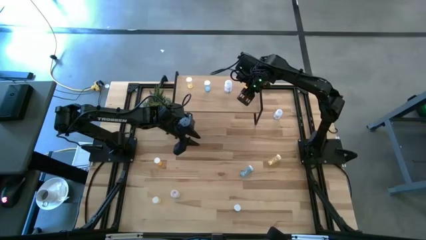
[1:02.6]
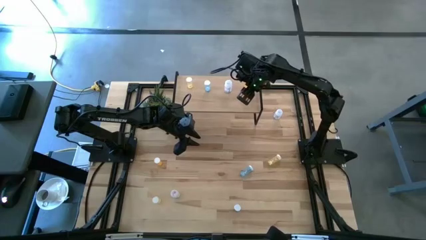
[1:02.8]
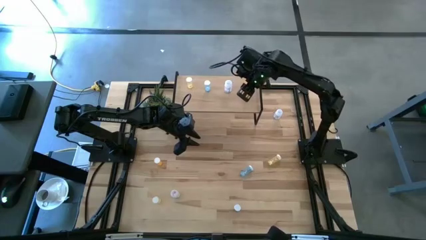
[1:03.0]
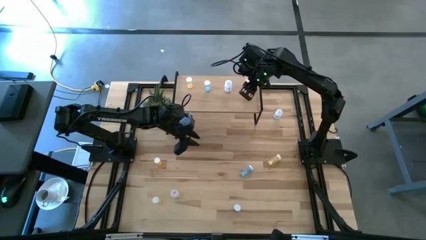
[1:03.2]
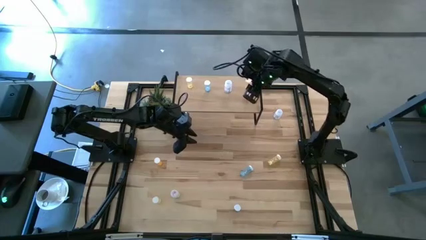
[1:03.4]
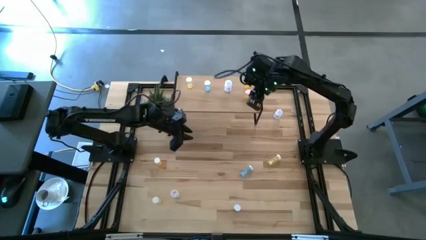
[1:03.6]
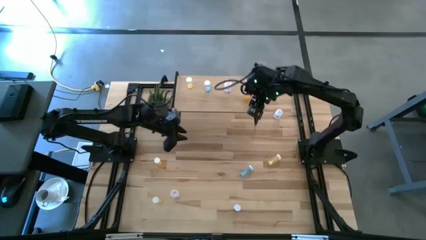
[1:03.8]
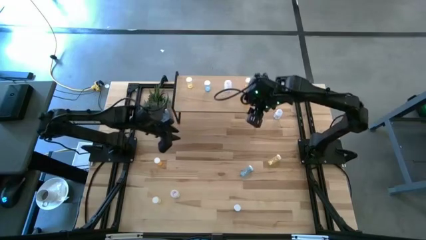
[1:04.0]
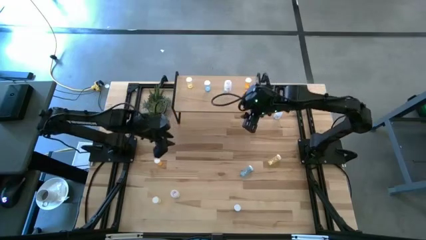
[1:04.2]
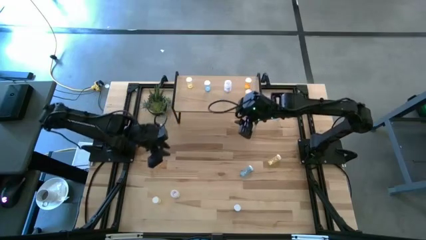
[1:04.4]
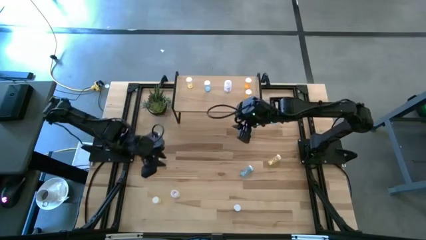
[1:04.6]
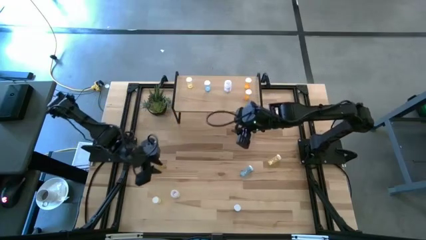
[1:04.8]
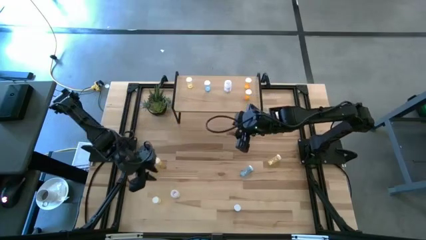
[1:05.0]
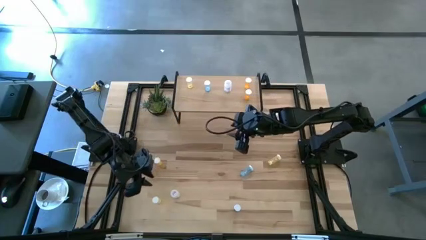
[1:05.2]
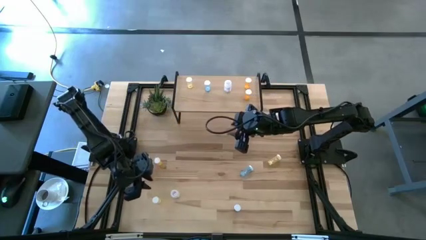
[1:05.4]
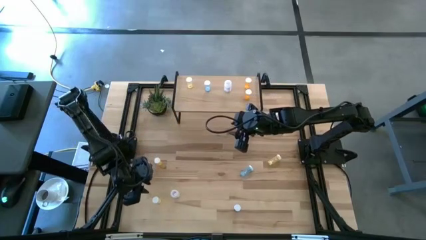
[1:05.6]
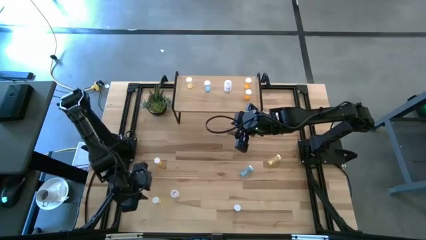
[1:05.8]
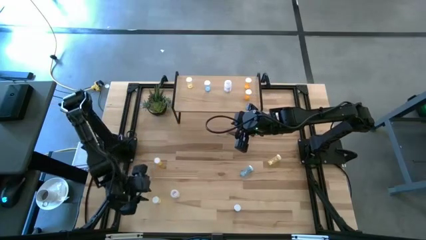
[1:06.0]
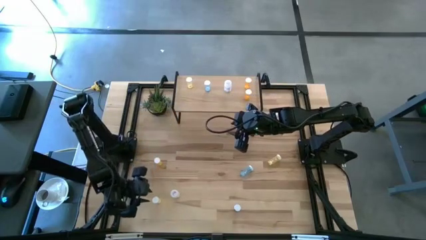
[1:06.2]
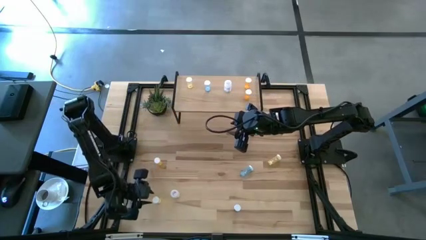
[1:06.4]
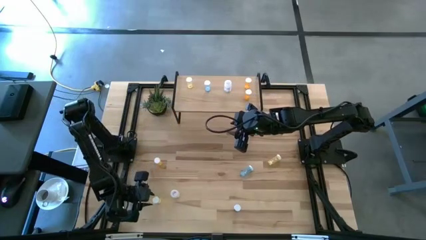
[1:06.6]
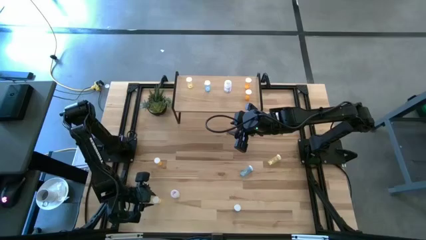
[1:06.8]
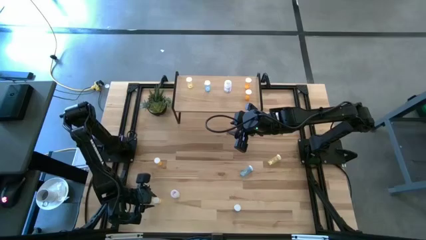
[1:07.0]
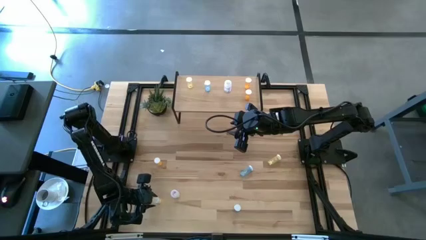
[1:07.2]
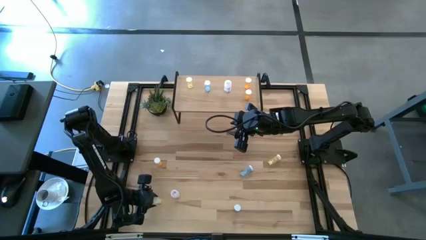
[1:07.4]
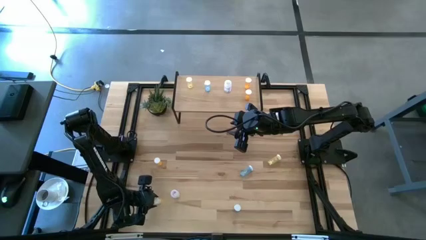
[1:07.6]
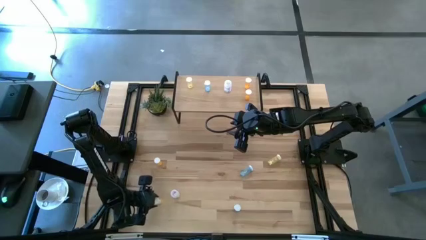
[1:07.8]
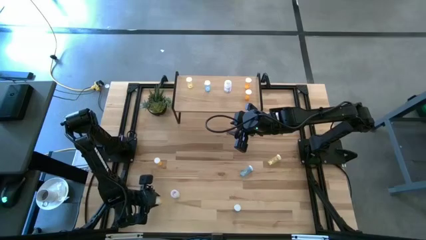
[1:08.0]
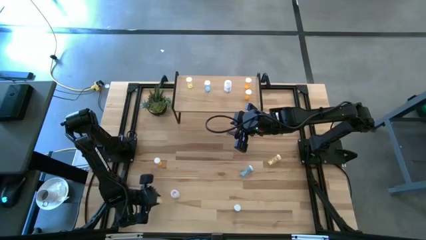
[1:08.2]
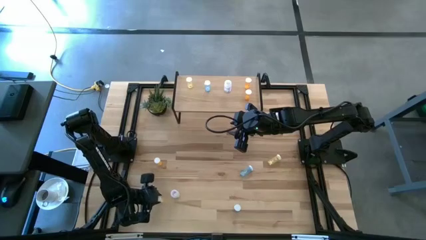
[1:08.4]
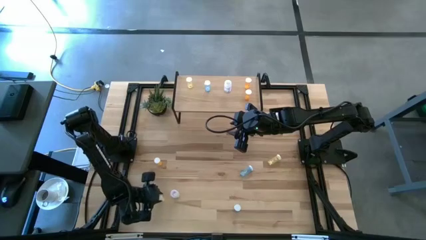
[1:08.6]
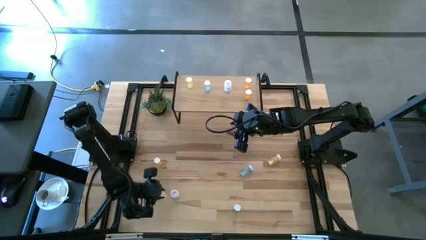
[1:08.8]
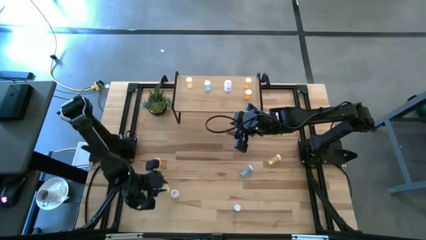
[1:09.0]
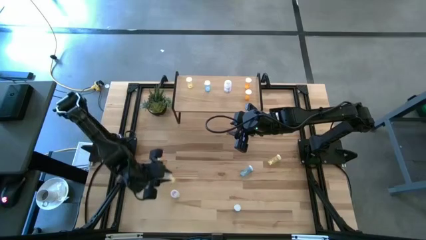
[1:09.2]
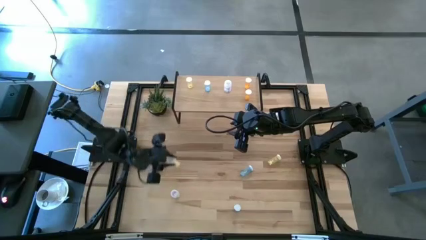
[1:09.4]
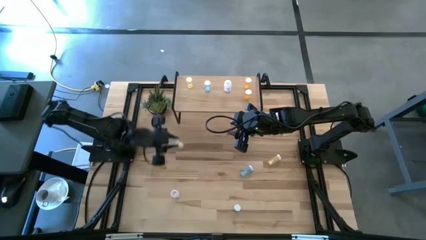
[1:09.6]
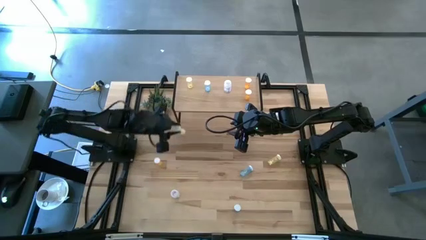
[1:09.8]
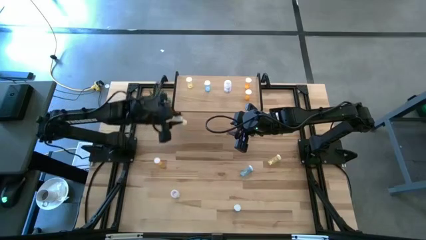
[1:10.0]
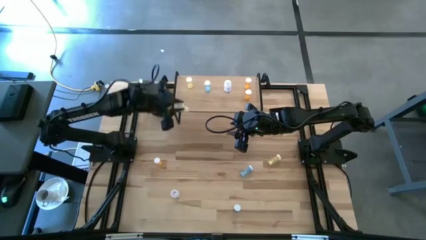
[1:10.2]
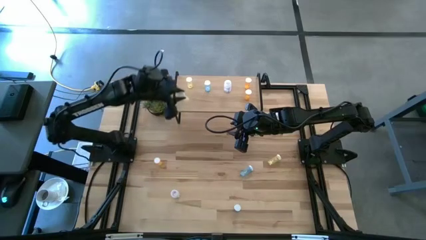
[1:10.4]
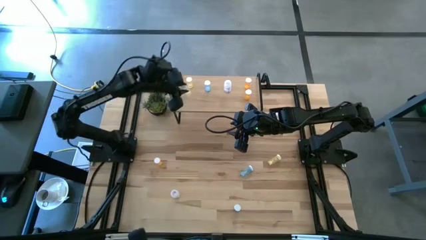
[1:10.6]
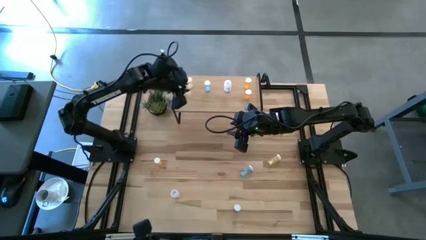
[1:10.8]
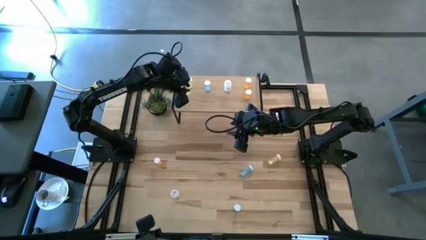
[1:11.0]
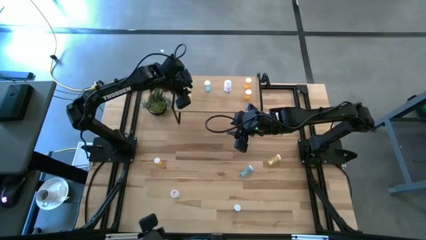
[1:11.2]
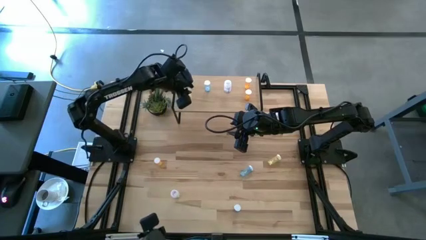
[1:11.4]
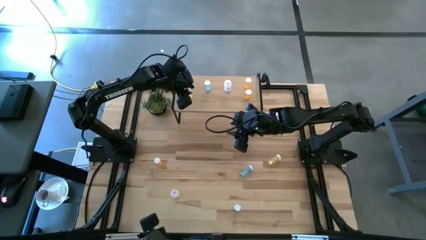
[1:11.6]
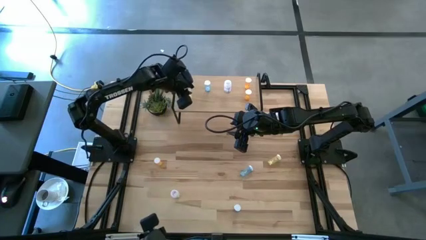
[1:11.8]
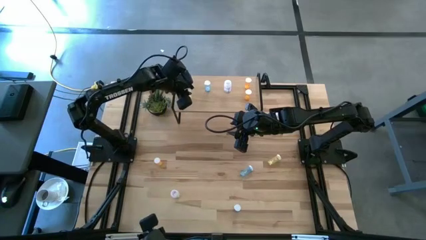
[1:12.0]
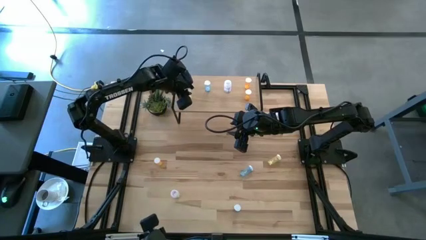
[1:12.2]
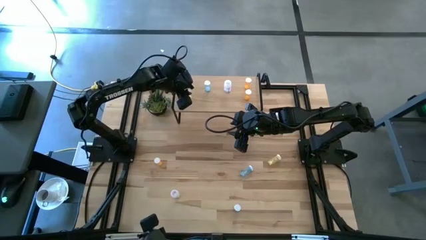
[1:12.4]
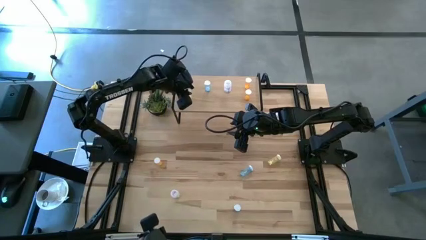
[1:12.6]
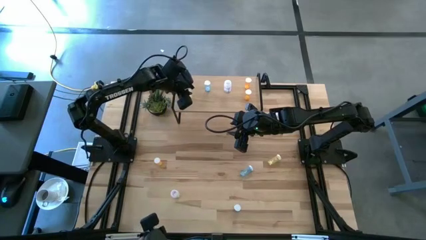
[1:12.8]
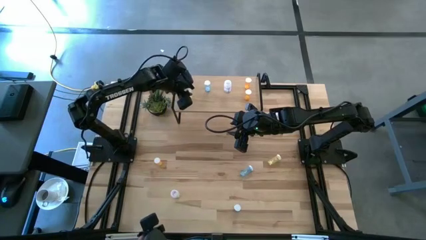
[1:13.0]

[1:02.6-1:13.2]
Task: Pick and place medicine bottles onto shelf by color
Put the left yellow pill bottle on the shelf

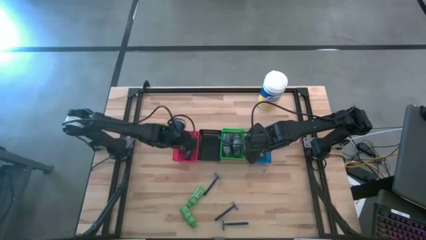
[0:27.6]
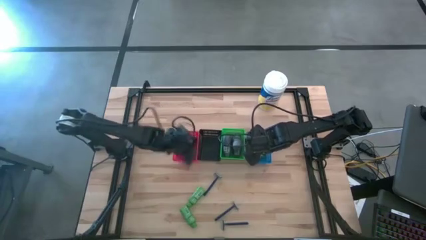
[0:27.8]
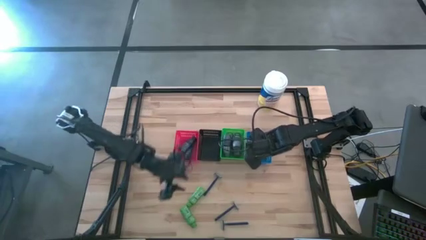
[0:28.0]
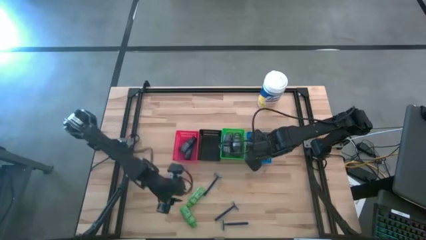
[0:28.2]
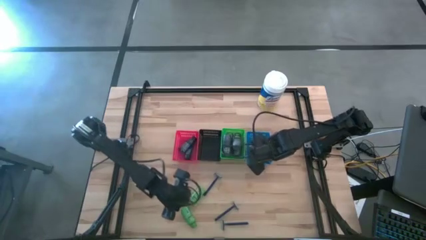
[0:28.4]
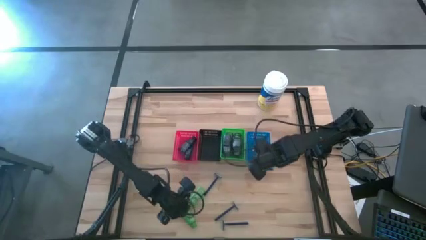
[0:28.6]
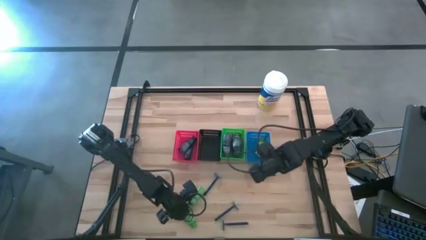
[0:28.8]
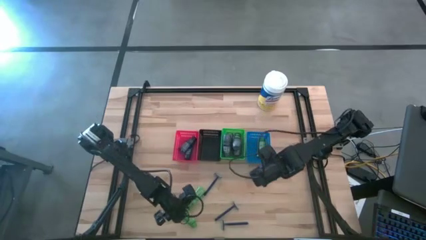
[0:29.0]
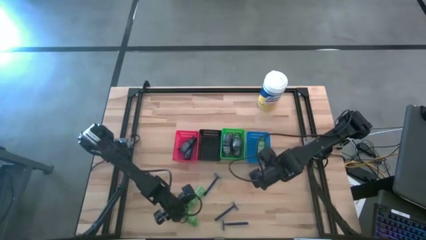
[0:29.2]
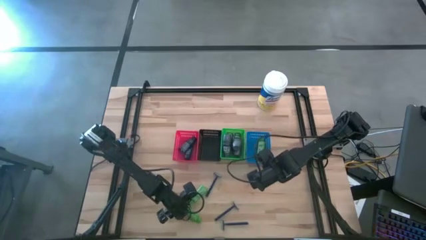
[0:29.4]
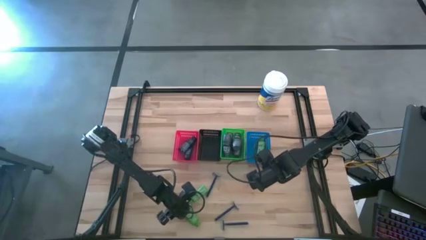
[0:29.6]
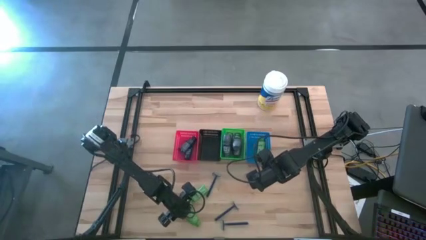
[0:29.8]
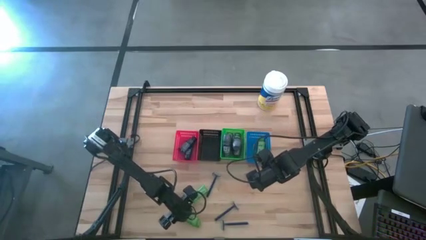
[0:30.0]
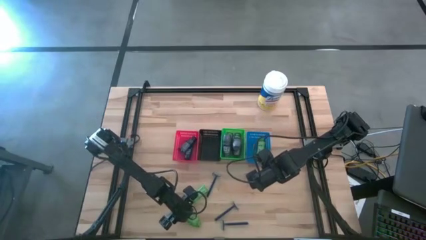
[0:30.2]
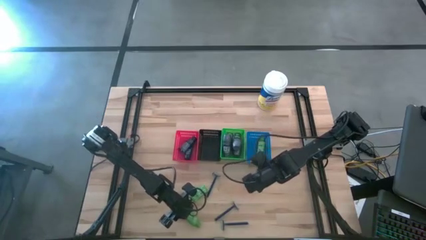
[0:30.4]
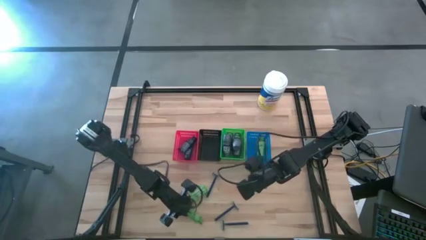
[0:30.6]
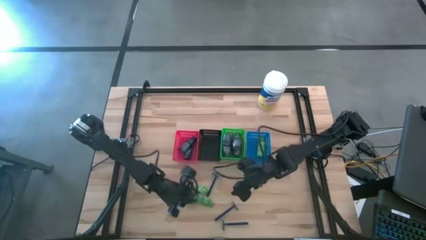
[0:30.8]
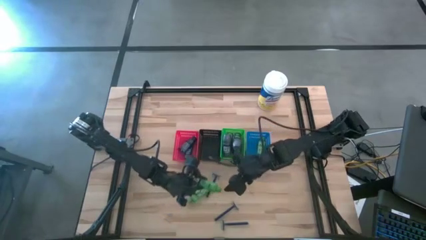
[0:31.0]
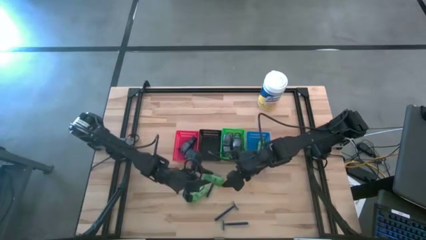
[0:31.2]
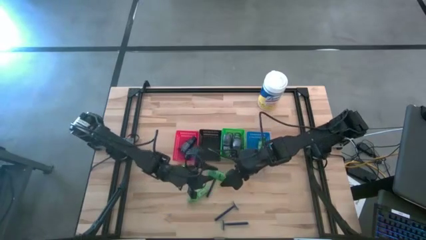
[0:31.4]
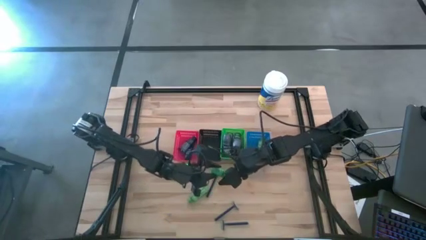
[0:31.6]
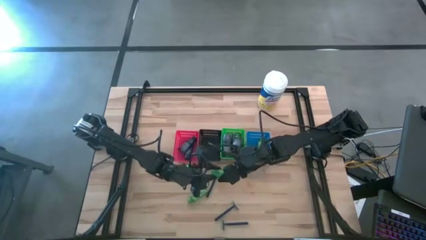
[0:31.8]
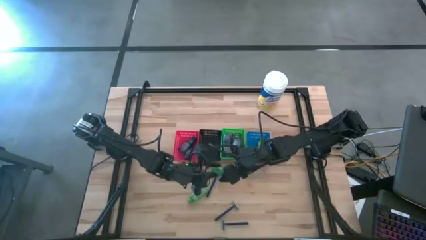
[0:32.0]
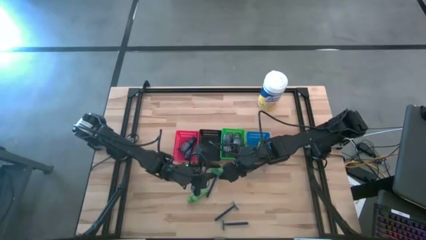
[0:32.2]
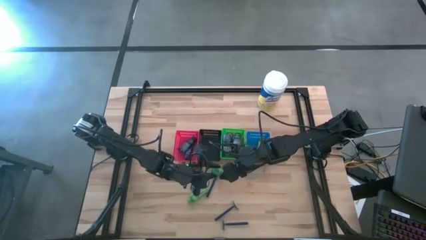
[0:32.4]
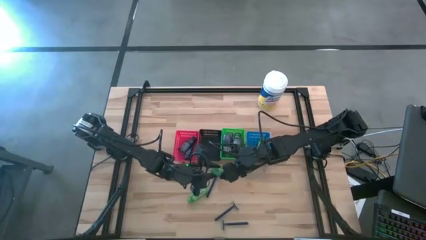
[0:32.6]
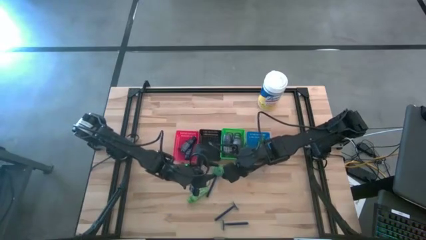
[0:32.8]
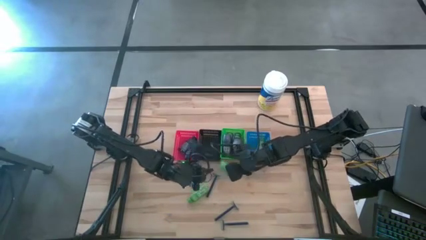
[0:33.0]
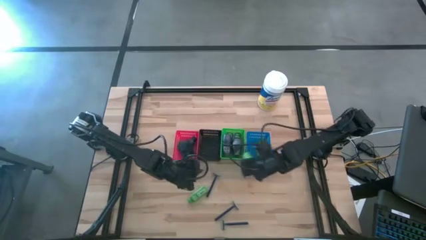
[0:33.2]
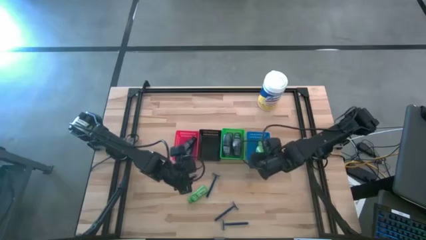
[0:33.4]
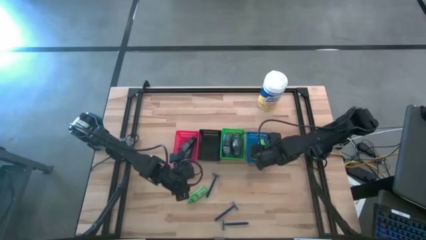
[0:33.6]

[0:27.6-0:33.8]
Task: Pick & Place Travel size toiletries
Put the green shampoo into the blue basket
